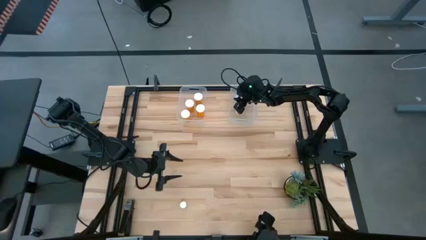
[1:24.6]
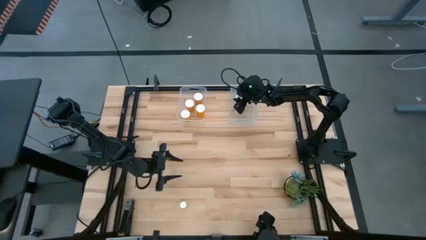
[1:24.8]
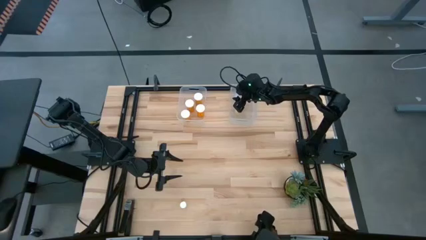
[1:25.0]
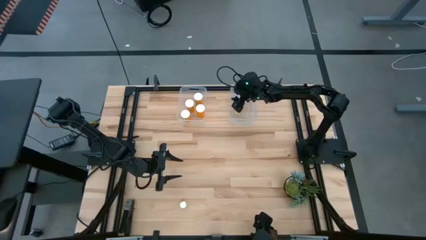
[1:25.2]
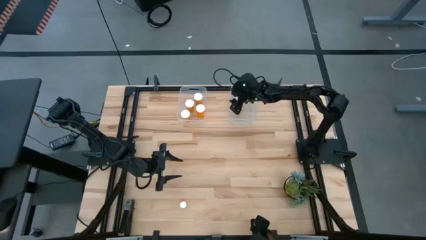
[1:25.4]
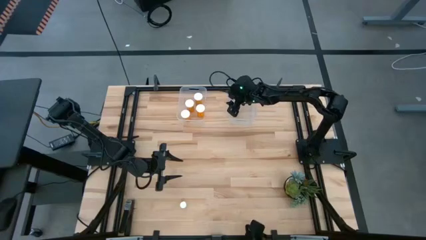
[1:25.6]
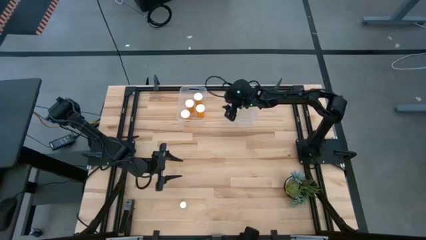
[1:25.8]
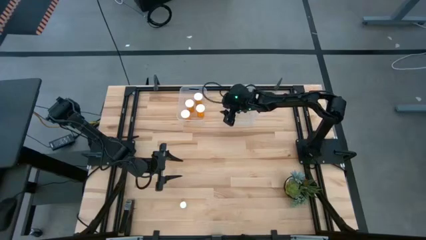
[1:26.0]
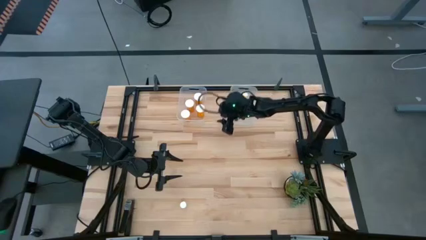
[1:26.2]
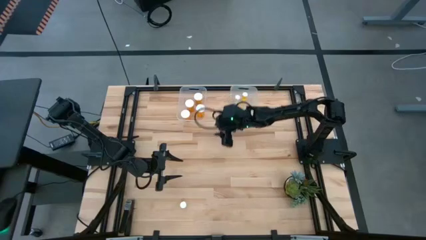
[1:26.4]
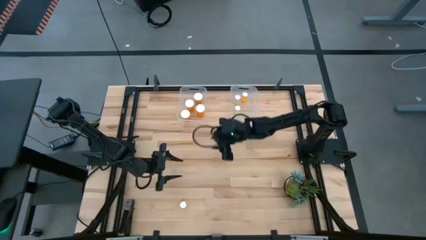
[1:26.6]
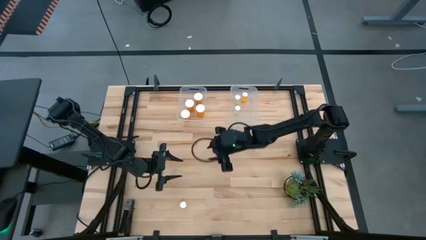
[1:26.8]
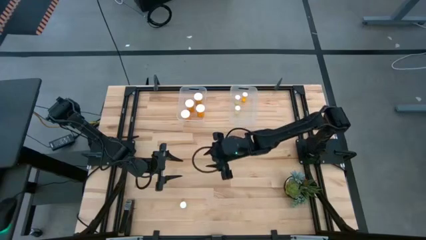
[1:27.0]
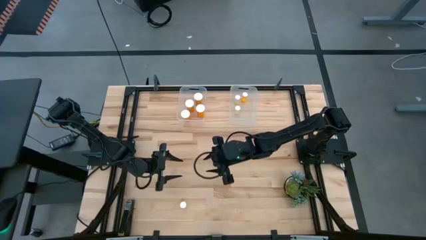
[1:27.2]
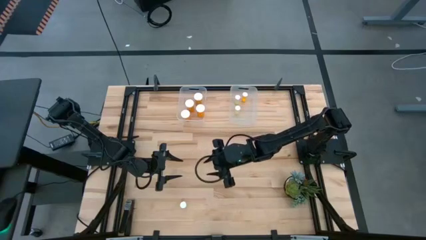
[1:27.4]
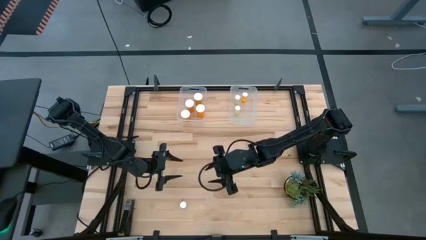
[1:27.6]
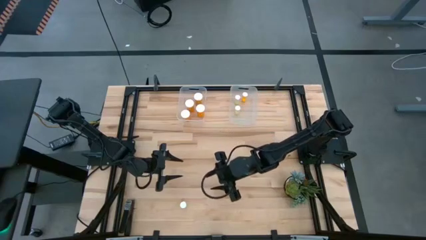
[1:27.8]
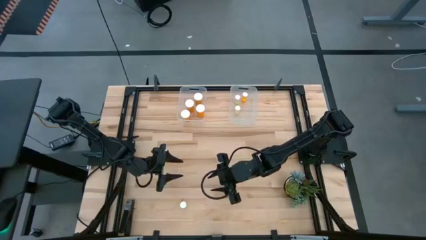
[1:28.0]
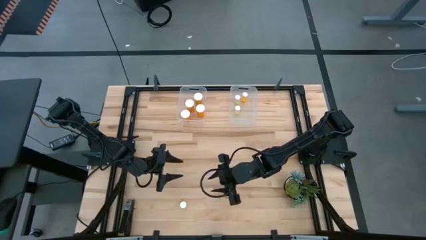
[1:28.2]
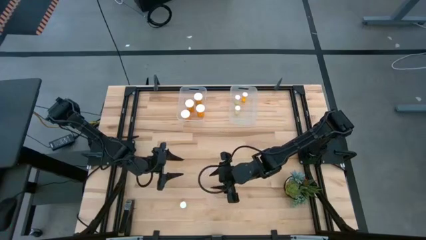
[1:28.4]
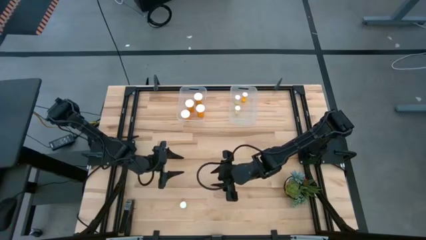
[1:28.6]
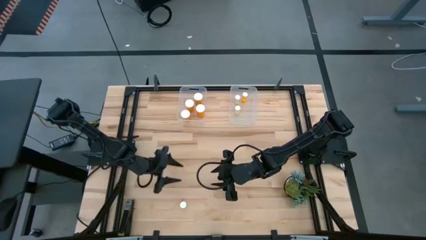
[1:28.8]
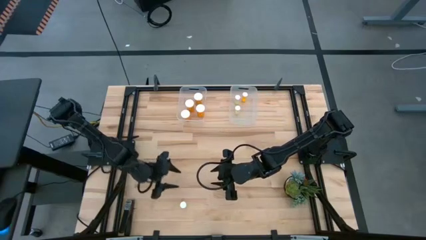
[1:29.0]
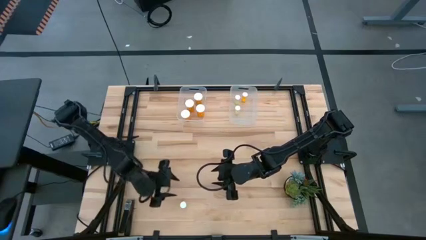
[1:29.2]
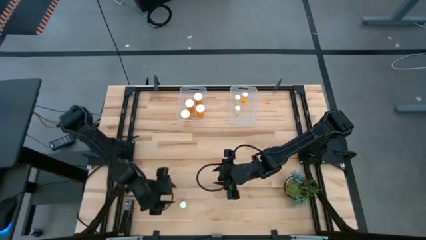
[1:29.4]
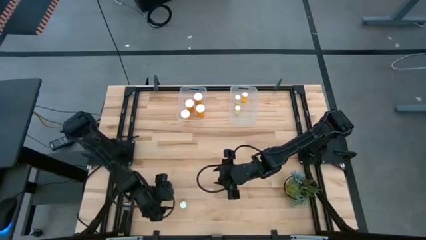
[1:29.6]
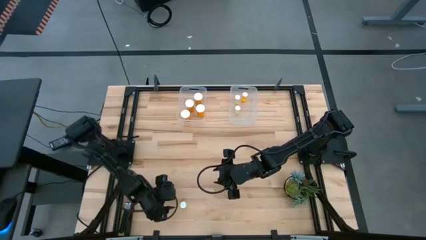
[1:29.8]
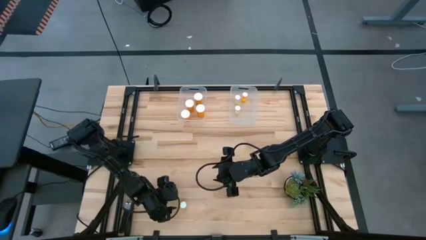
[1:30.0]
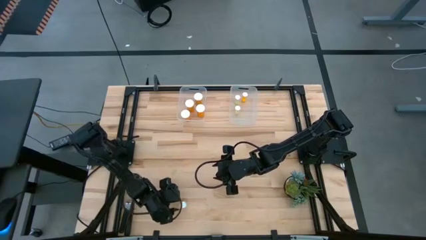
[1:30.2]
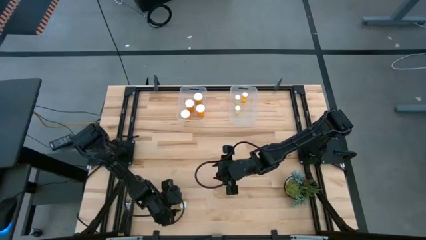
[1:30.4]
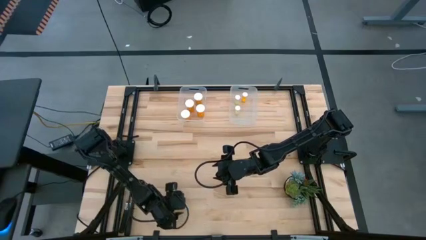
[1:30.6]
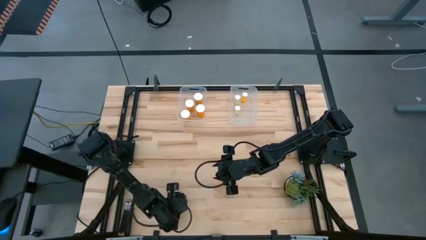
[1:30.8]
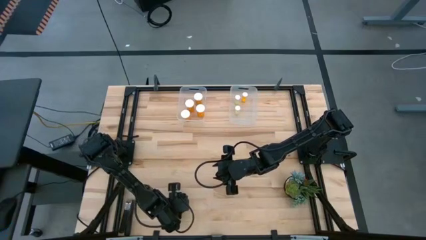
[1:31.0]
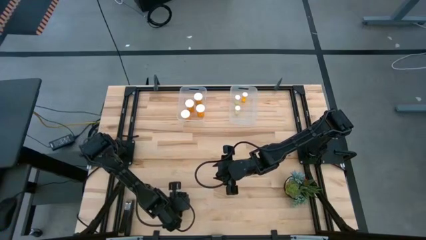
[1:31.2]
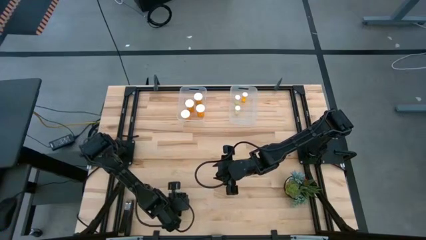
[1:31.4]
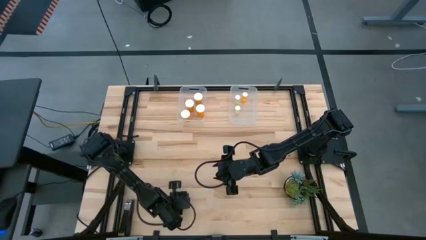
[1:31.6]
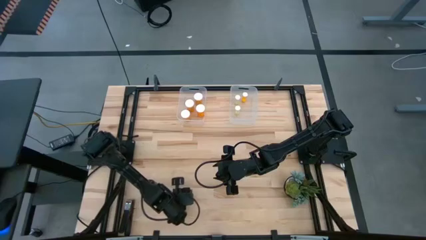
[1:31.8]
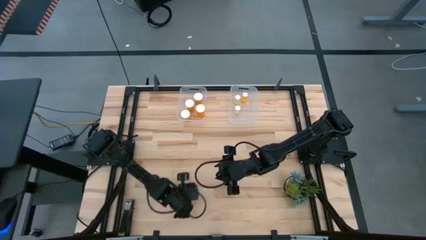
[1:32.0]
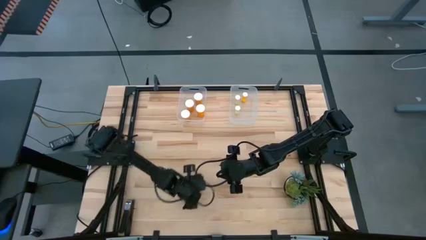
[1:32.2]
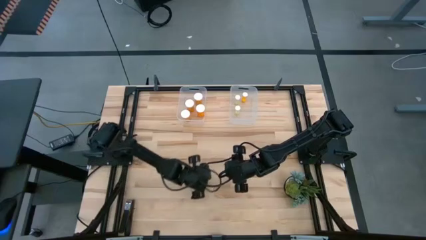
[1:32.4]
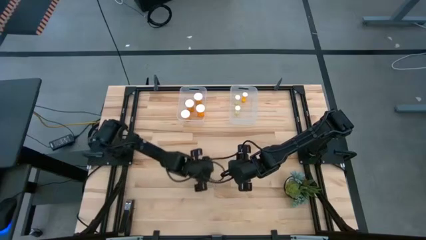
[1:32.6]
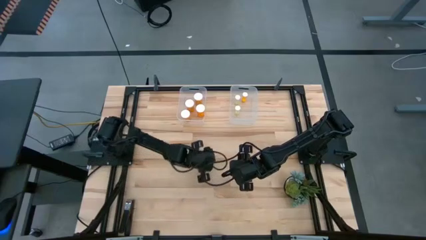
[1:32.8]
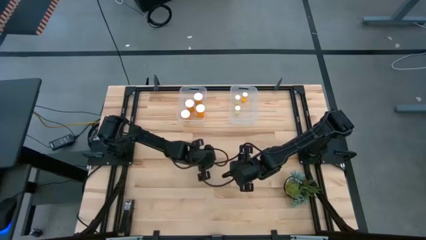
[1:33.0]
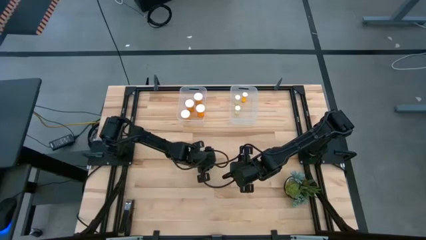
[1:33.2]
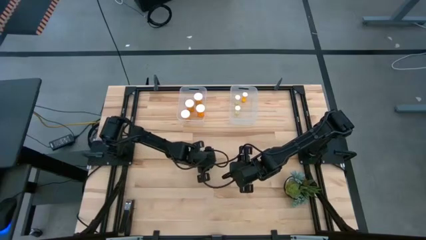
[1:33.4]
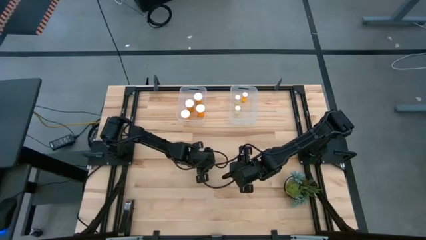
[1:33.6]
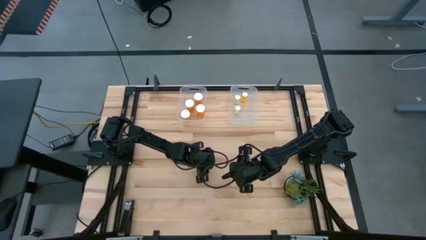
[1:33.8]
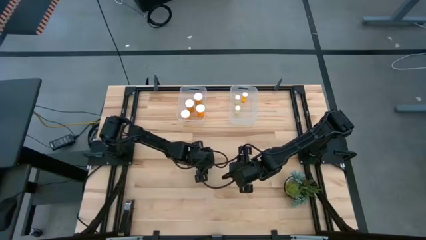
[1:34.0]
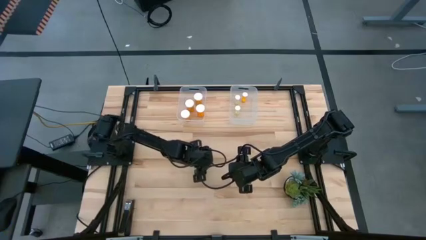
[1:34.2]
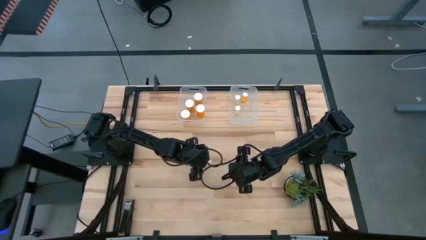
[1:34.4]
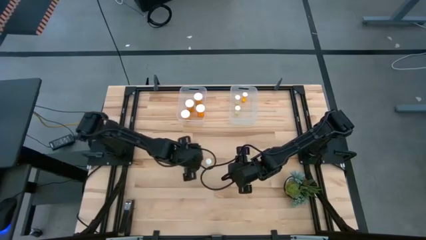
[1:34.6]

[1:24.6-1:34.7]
Task: Pick and place medicine bottles into bin by pill shape (circle, oval)
Put the small yellow pill bottle into the right transparent bin

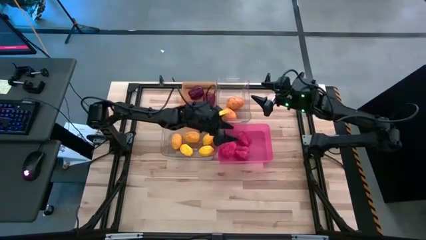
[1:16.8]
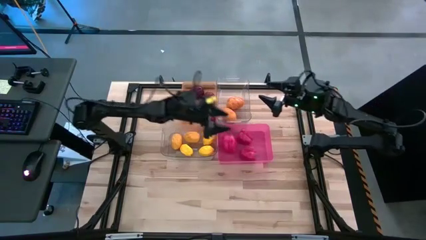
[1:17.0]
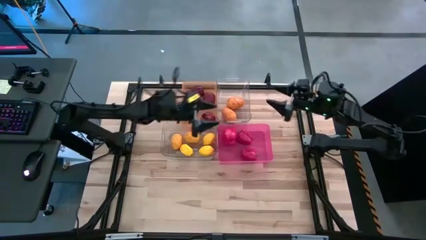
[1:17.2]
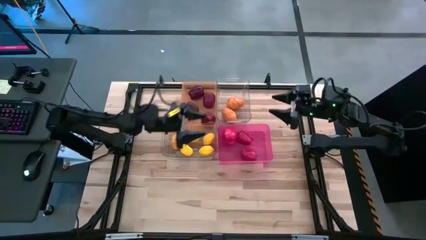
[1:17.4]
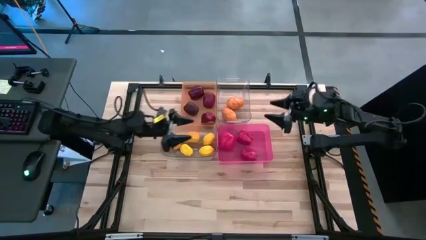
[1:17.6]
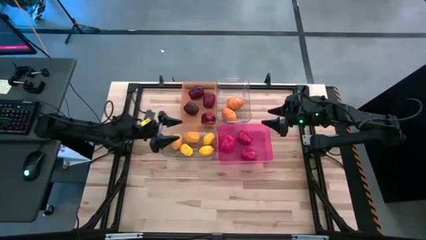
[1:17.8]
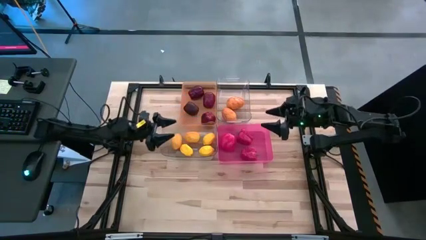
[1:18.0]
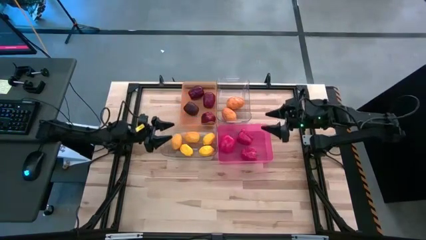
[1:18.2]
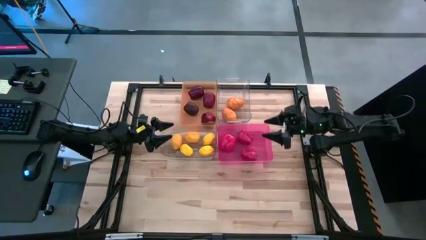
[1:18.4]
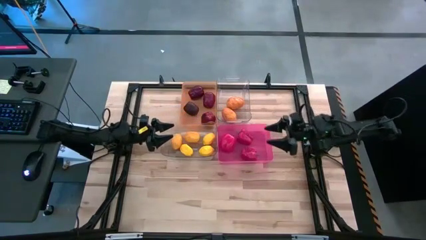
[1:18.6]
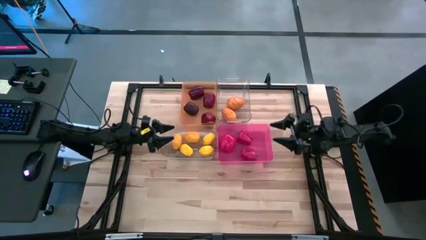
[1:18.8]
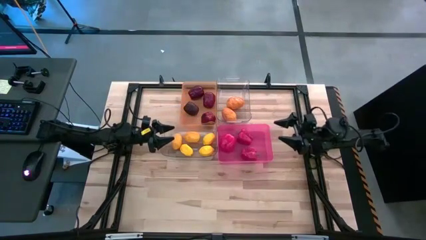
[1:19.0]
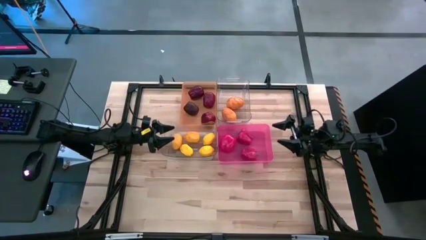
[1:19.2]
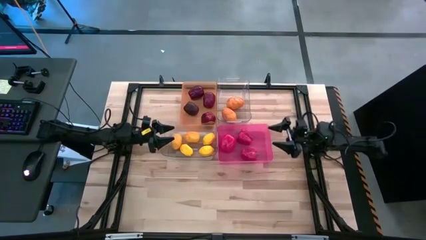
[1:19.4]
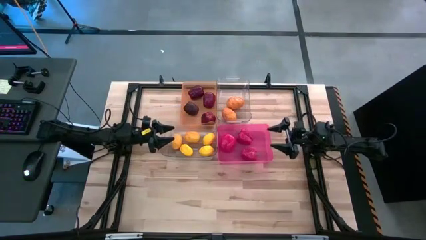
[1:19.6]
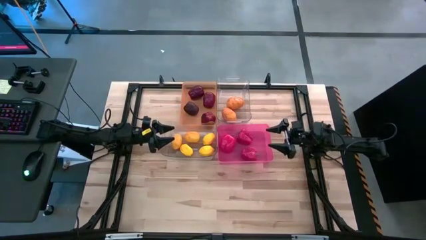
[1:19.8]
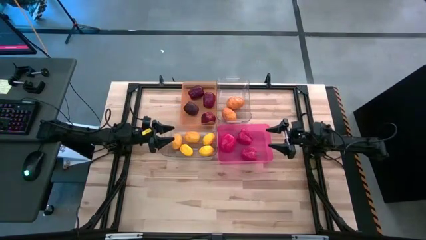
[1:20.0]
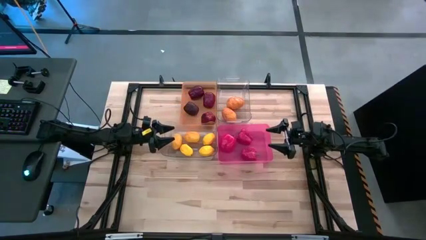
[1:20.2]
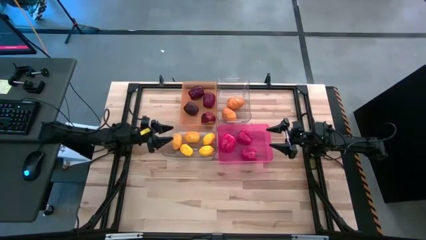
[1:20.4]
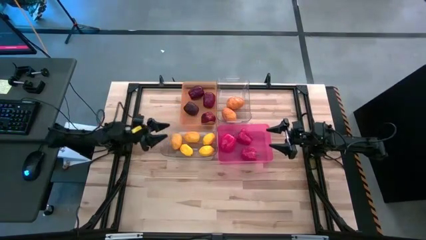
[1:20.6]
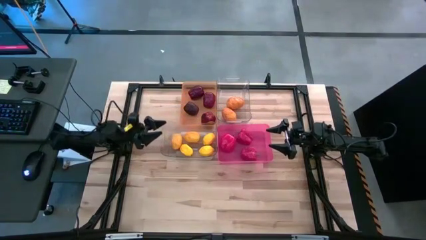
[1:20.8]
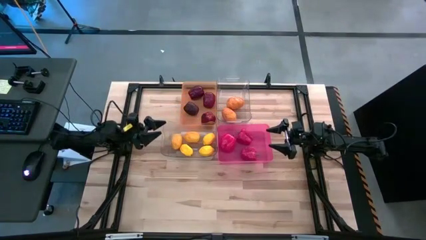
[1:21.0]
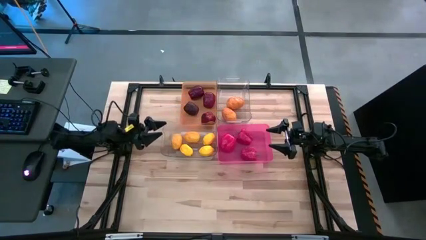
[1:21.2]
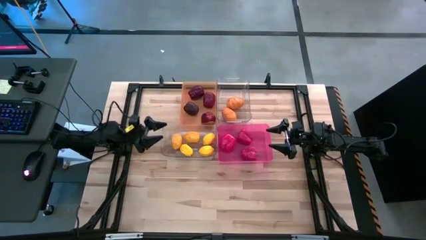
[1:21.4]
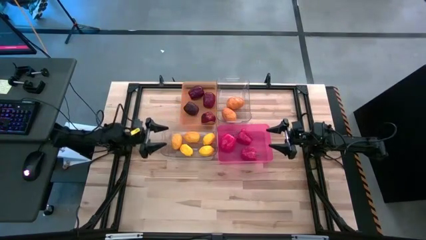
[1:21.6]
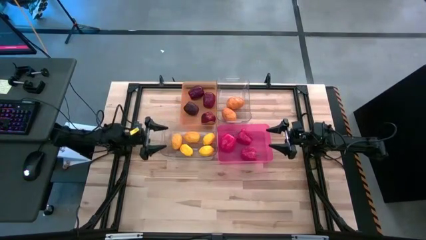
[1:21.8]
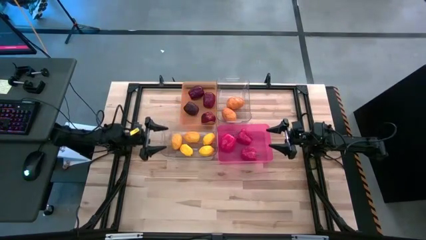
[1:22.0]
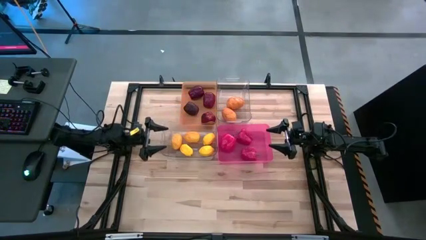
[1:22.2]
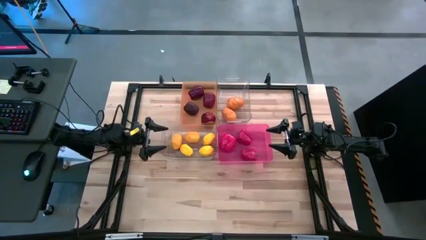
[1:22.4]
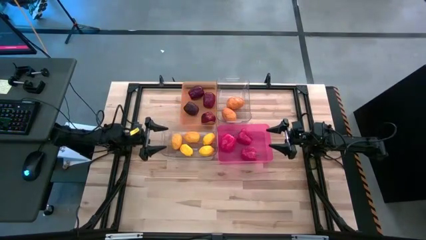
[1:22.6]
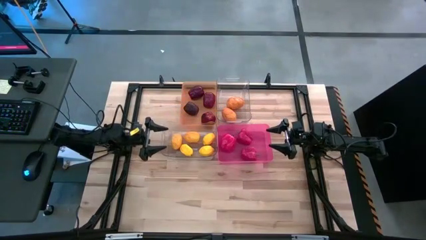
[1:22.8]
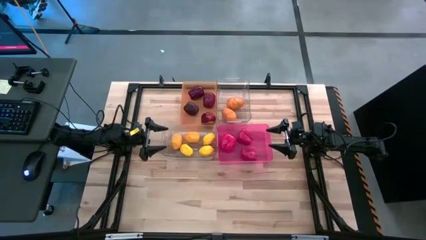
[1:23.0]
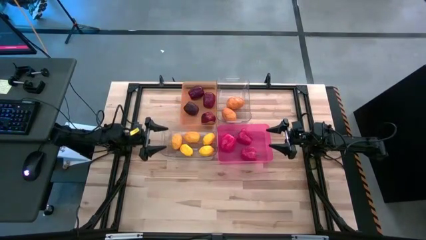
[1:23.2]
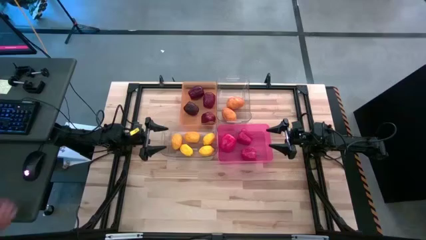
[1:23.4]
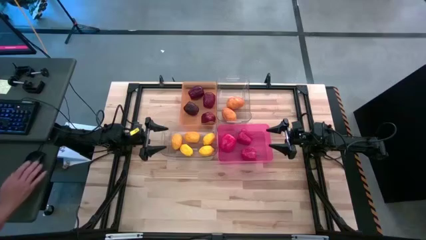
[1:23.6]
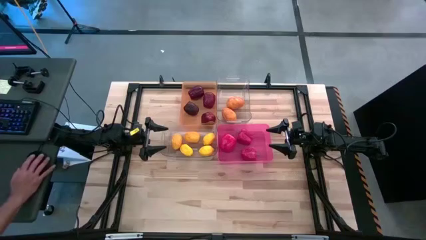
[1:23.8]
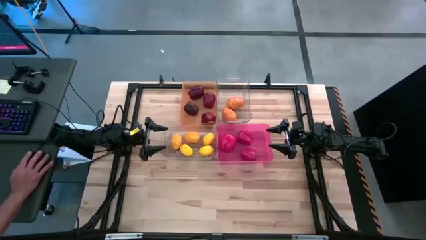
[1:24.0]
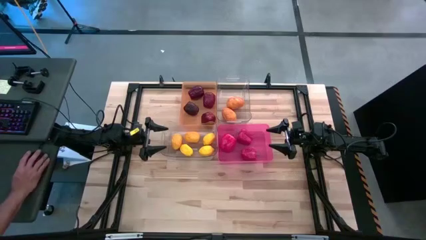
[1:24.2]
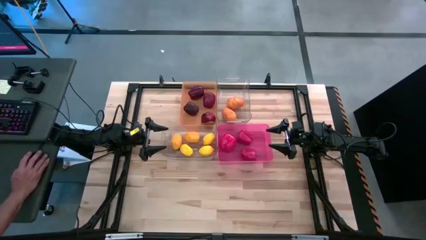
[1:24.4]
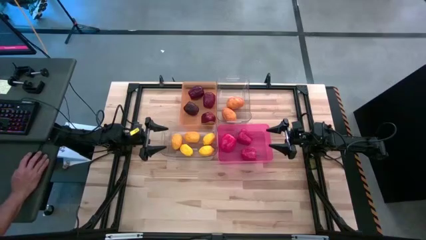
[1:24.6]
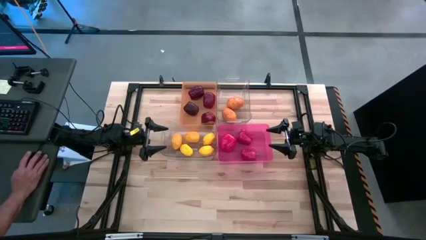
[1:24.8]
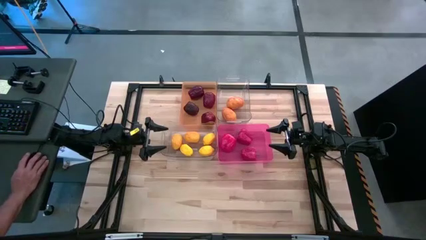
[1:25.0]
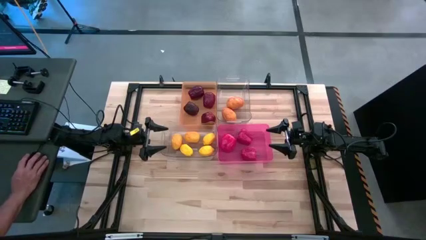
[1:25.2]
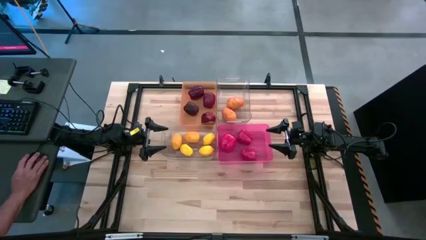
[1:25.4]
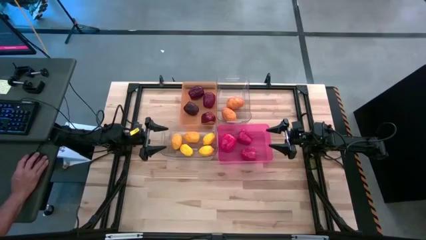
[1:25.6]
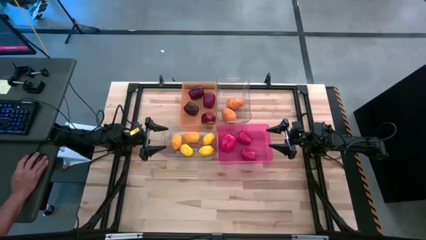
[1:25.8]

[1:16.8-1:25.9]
Task: Sort produce into baskets
Return to Home Position
